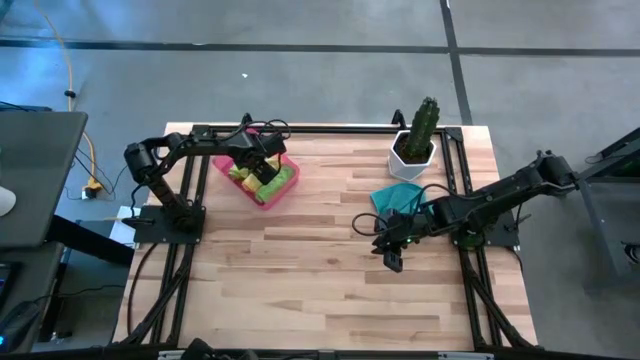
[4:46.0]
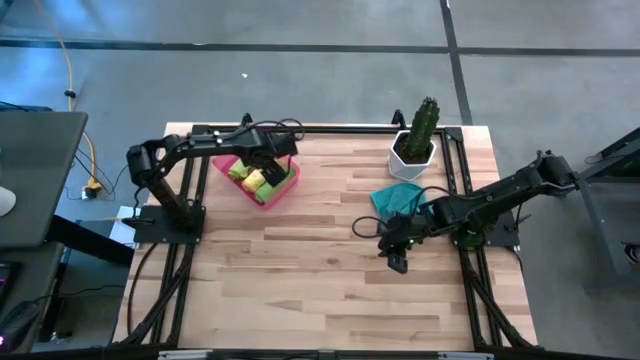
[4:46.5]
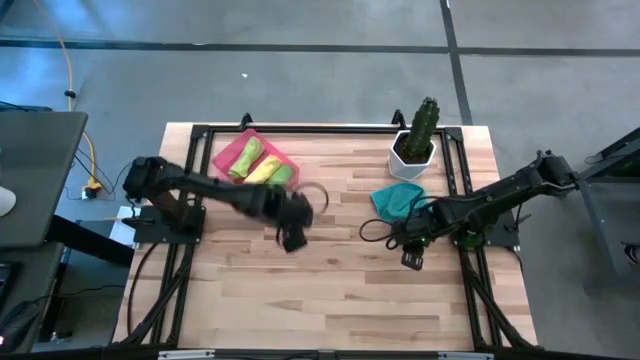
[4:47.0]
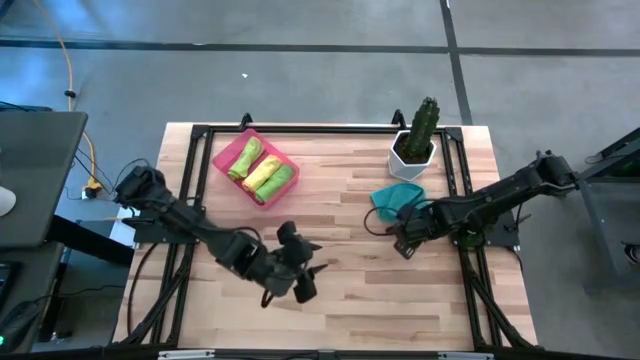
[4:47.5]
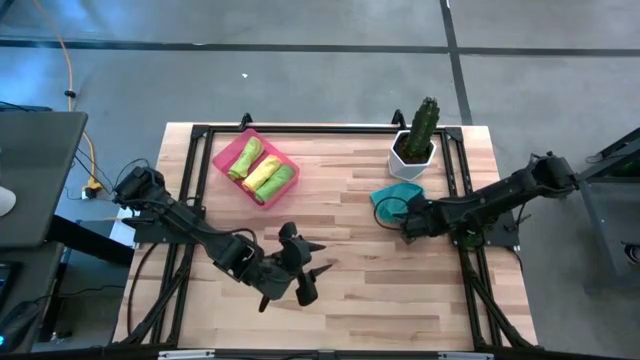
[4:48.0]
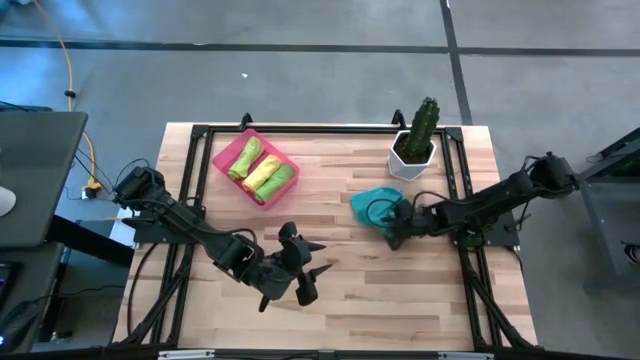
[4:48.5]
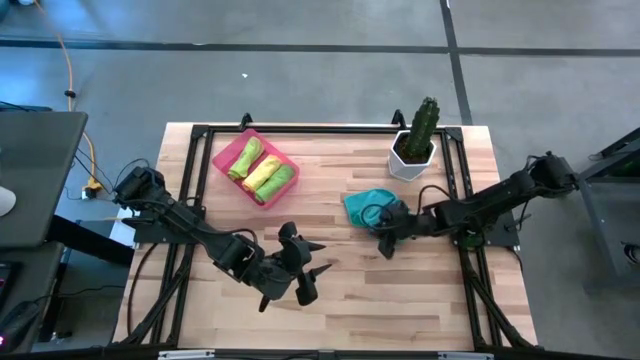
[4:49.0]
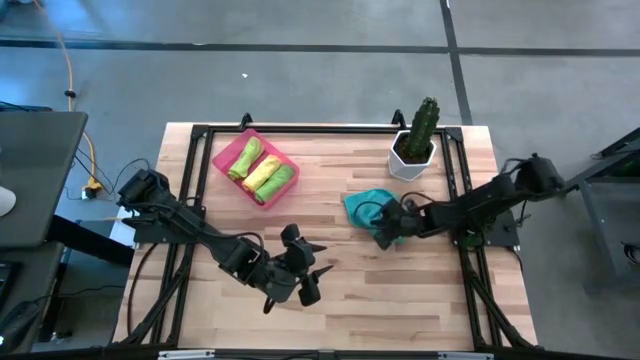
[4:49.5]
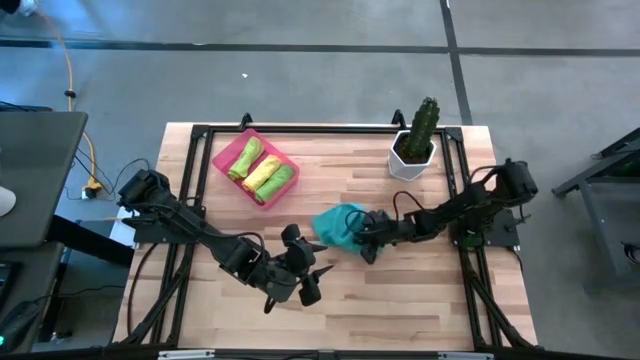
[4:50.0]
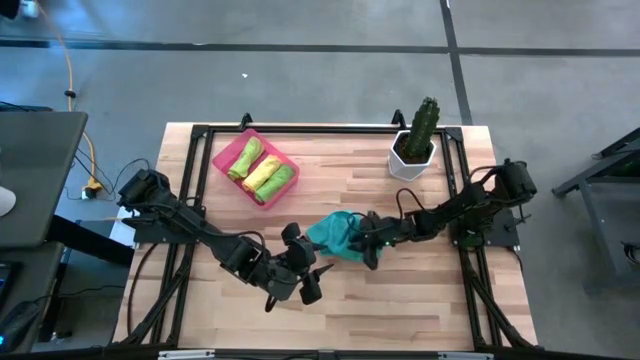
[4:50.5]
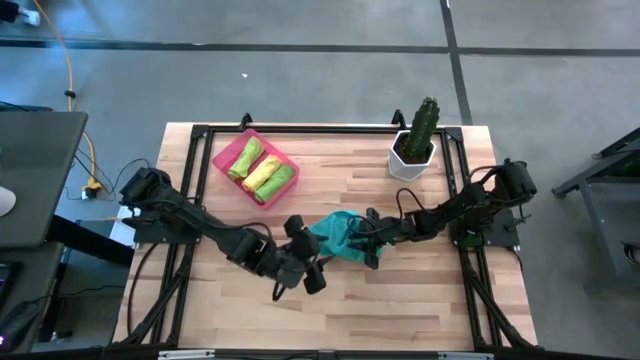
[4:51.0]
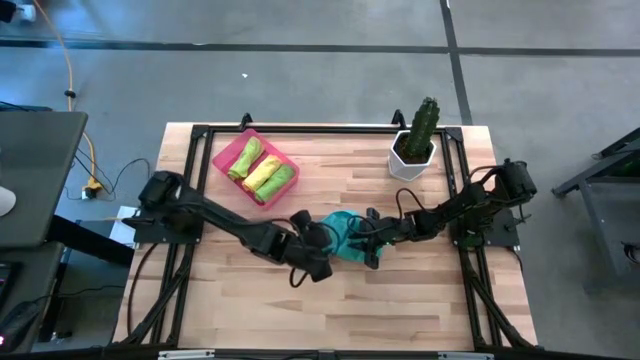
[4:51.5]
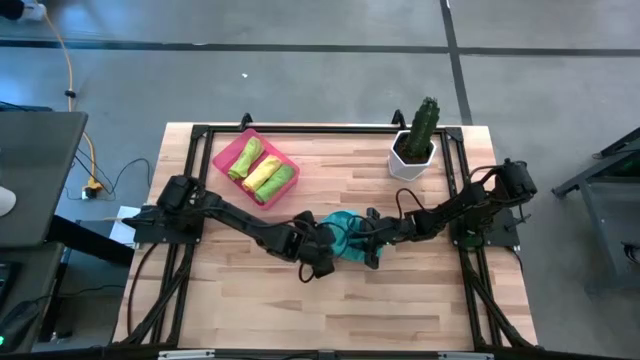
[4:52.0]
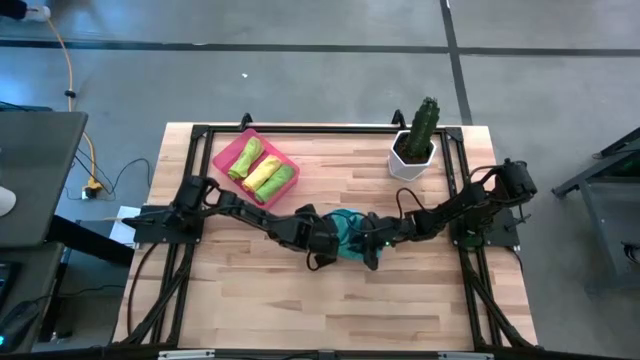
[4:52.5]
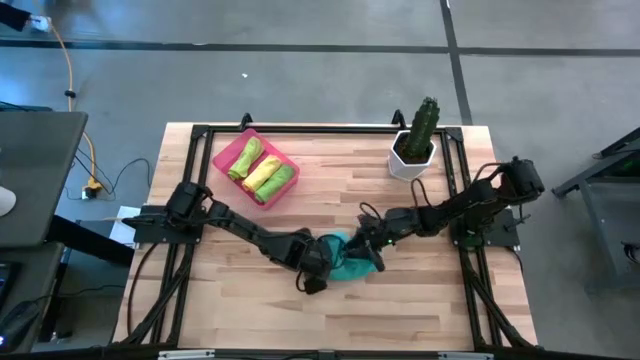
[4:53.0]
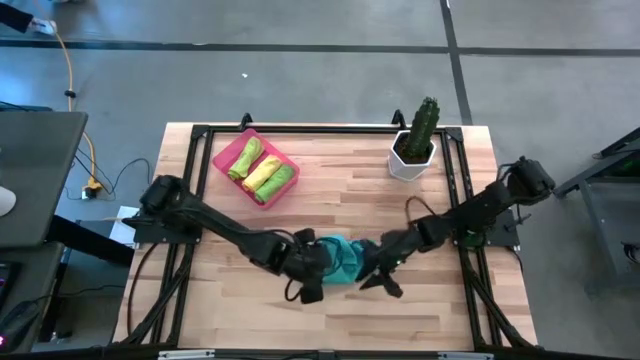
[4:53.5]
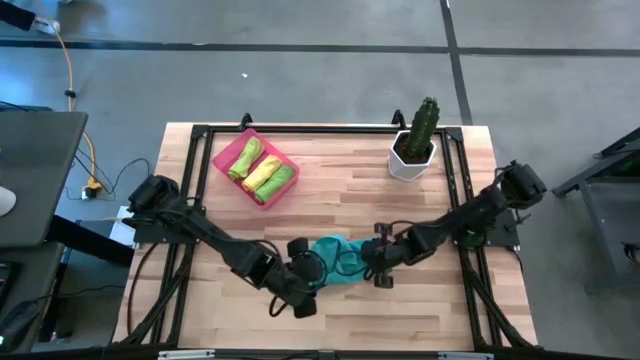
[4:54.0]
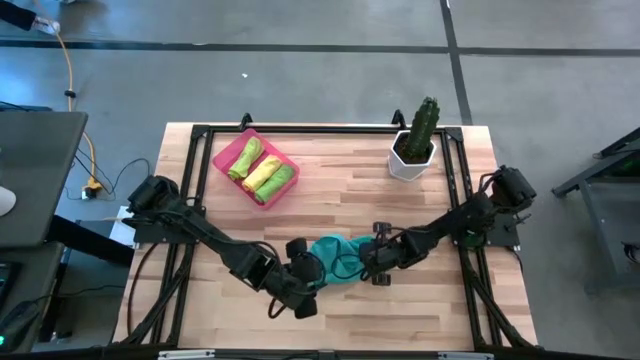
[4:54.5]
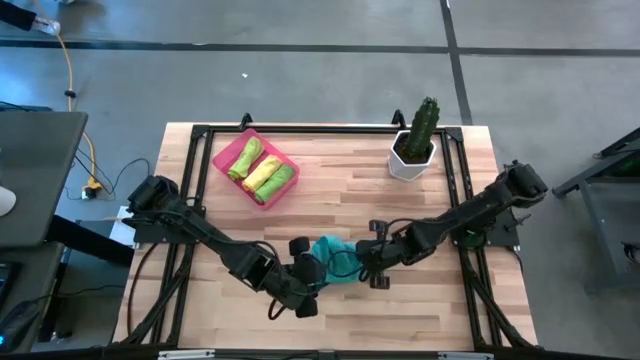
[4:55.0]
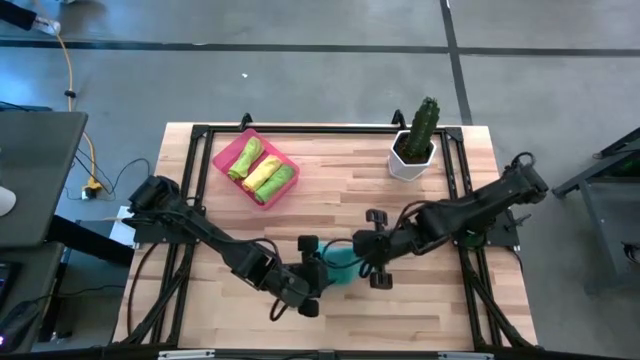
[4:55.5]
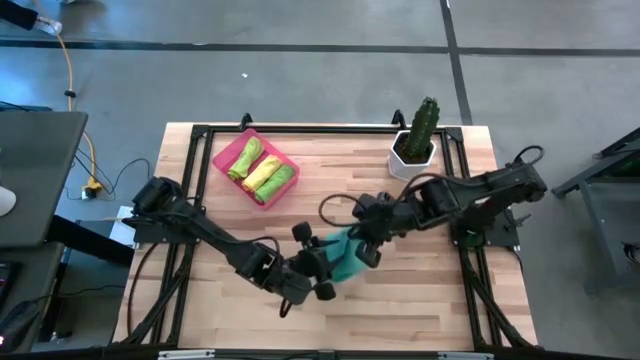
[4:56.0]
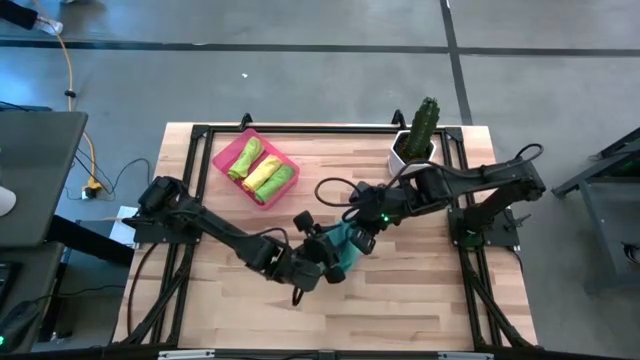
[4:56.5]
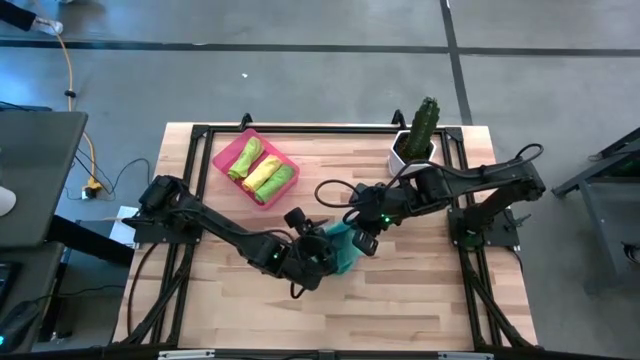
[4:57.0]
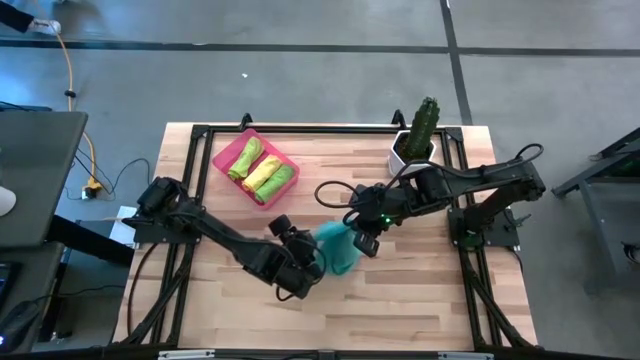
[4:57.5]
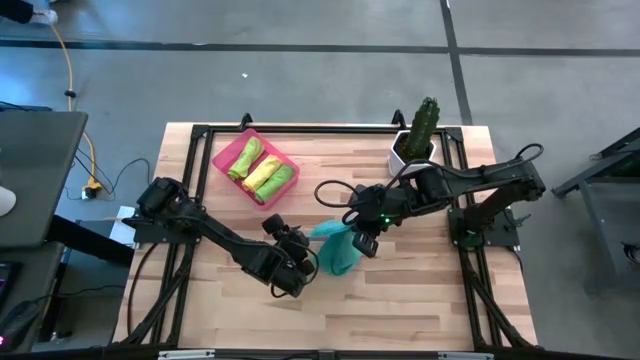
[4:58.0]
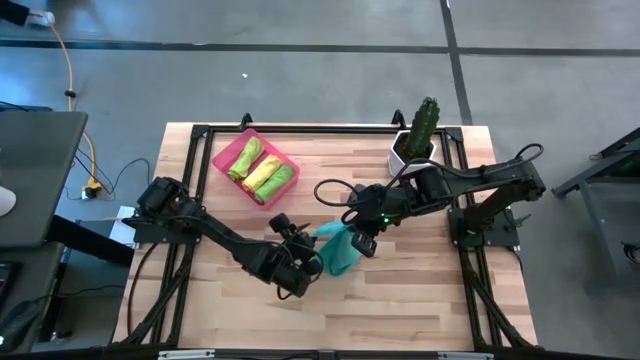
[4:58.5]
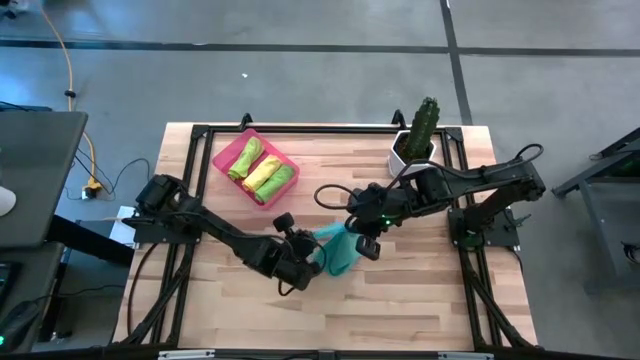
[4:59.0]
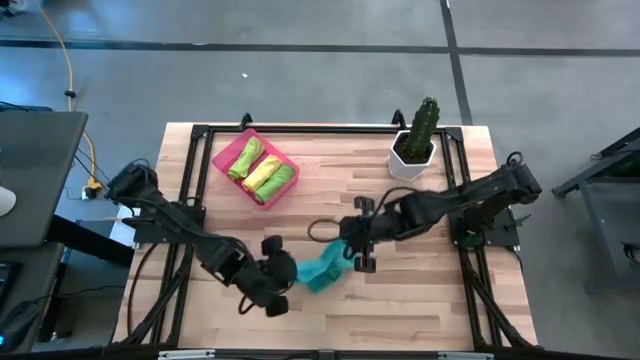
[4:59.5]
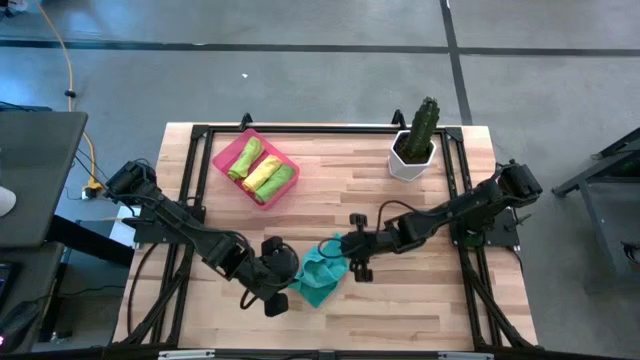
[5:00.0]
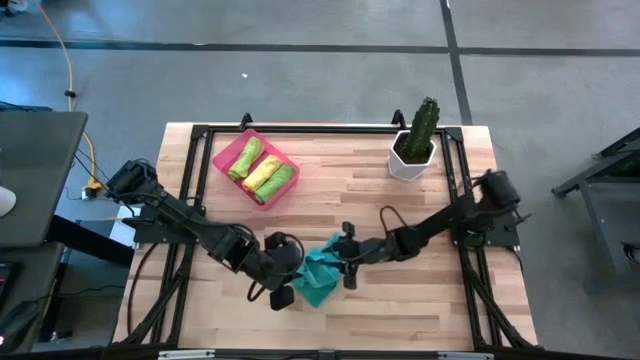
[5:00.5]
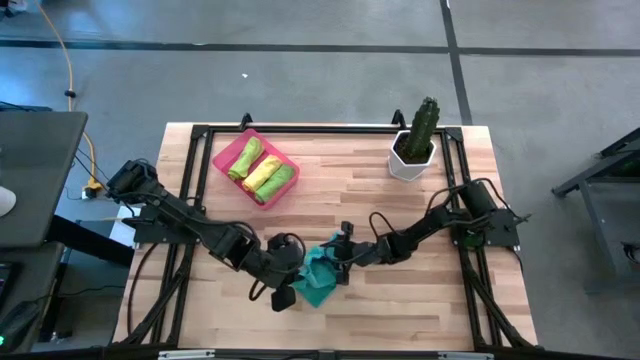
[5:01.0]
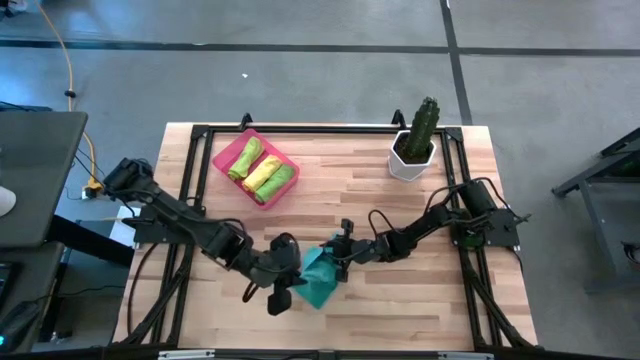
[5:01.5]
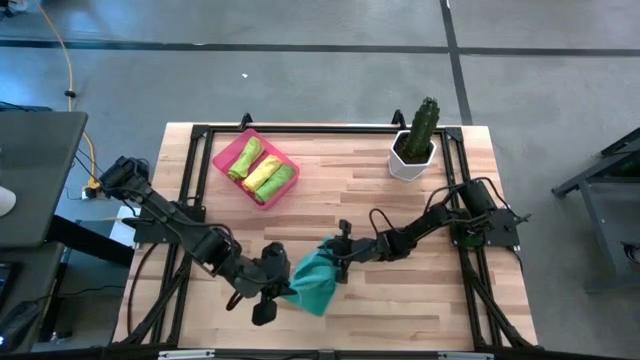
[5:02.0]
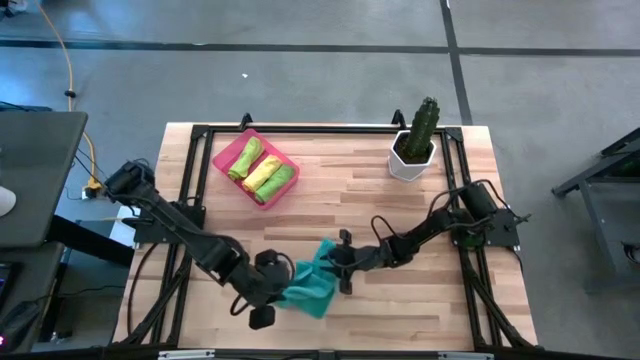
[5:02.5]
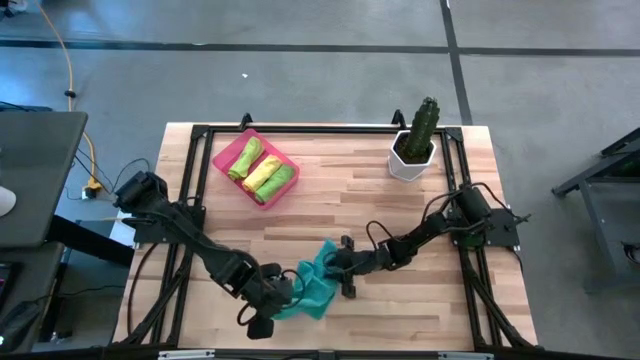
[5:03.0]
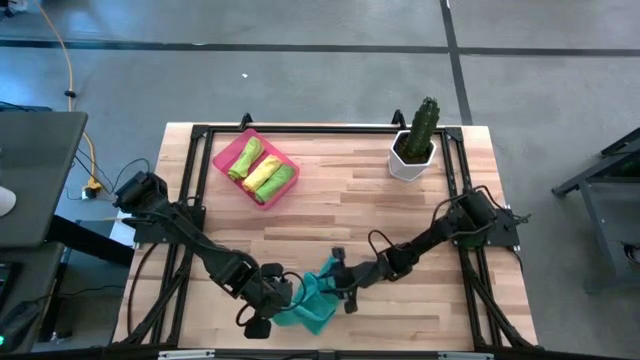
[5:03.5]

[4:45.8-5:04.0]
Task: Roll microfiber towels into tight, uniform cylinder then place into a basket
Roll the blue microfiber cloth

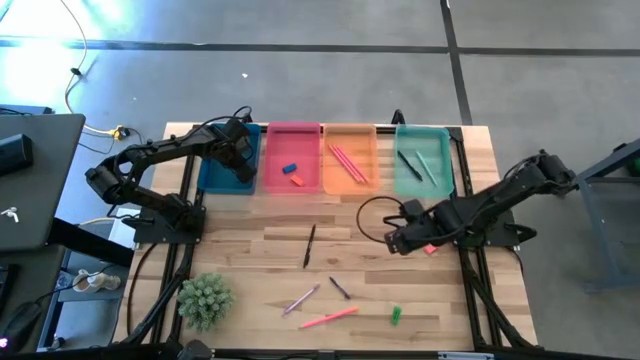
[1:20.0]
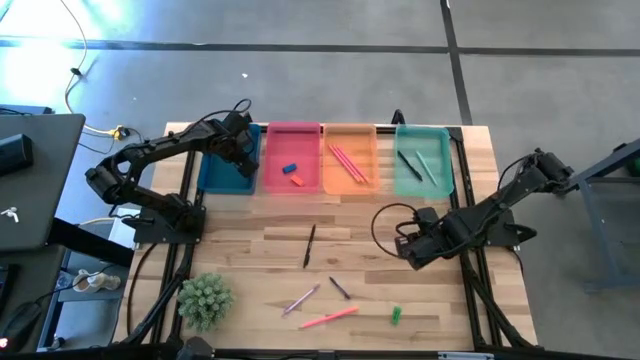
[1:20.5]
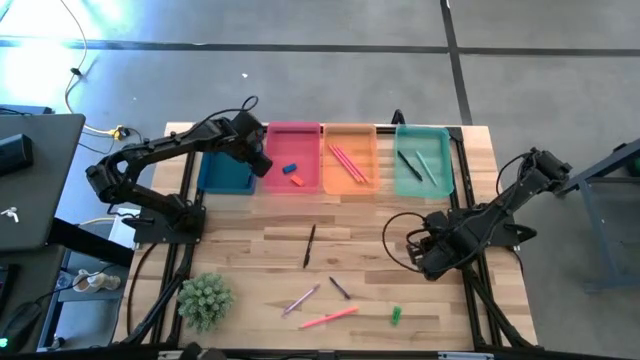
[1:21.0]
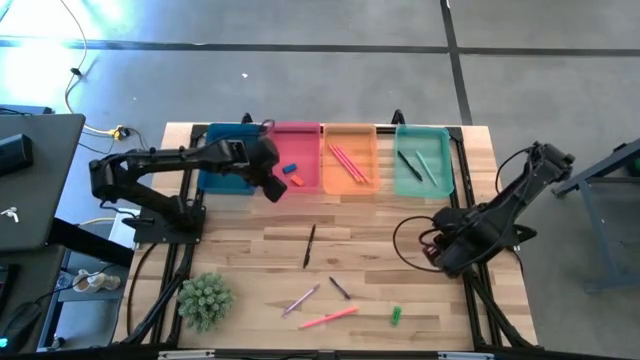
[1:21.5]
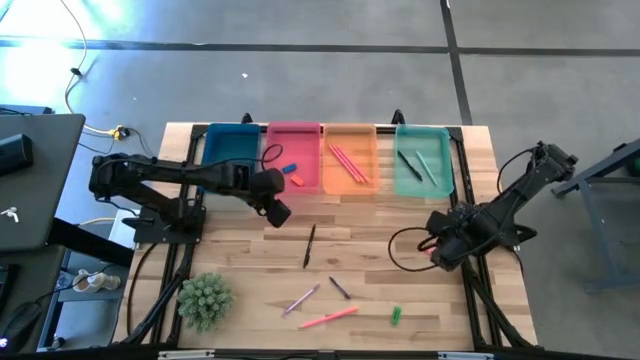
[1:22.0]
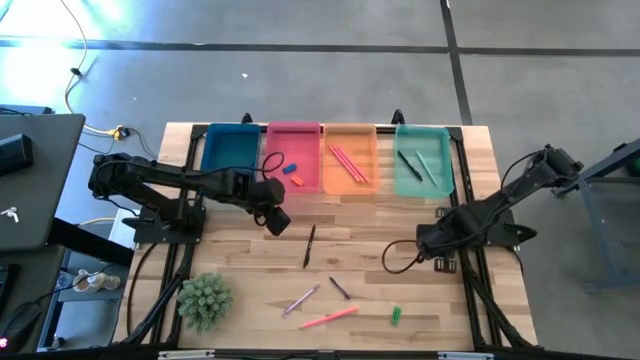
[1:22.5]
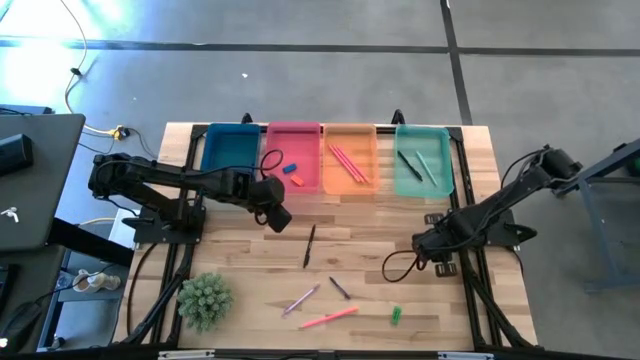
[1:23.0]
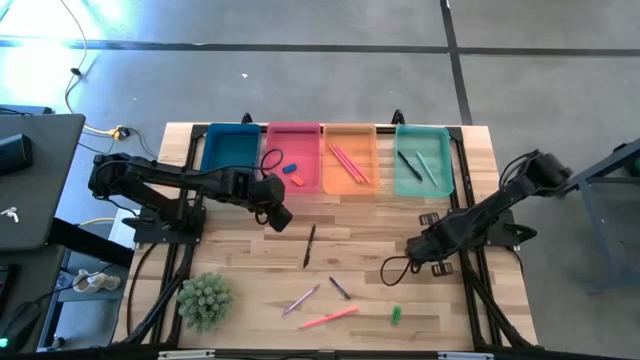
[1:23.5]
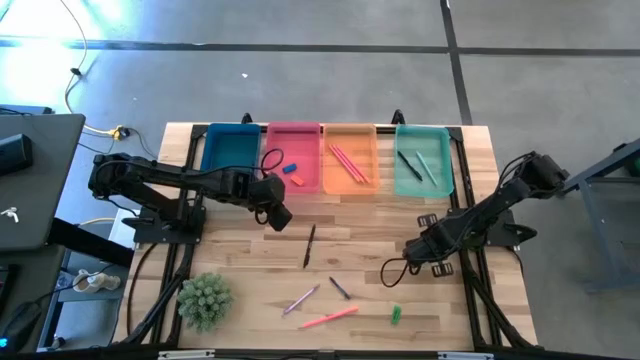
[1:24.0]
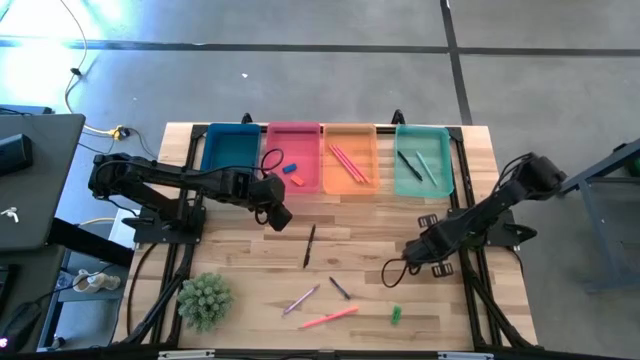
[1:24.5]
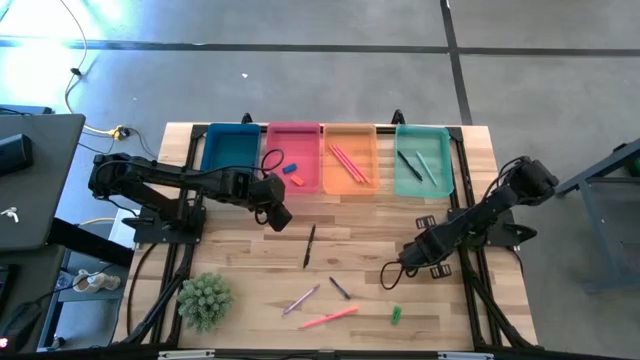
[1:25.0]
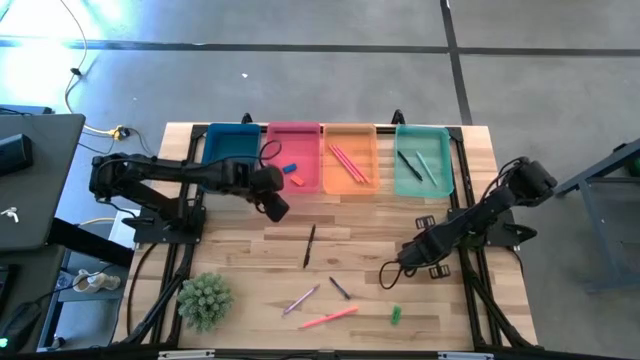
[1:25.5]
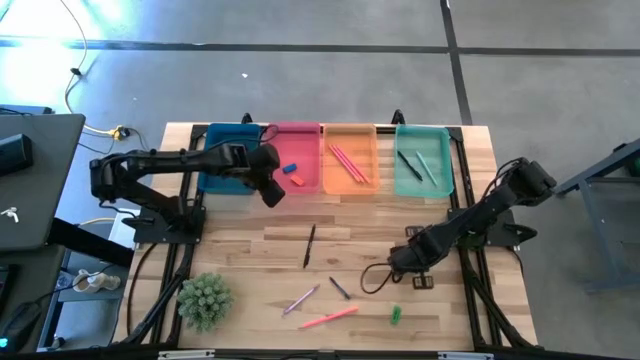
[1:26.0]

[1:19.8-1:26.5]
Task: Sort crayons/erasers/pens/pencils in bins
Put the pink eraser into the pink bin
